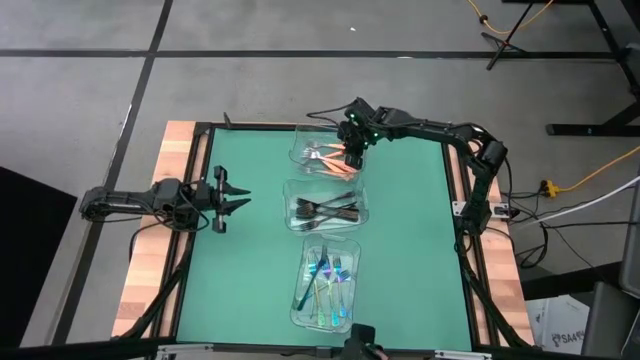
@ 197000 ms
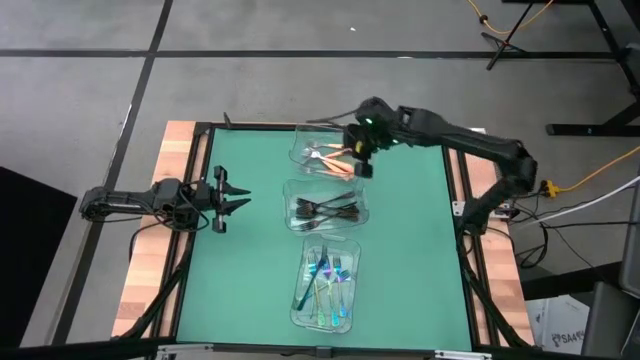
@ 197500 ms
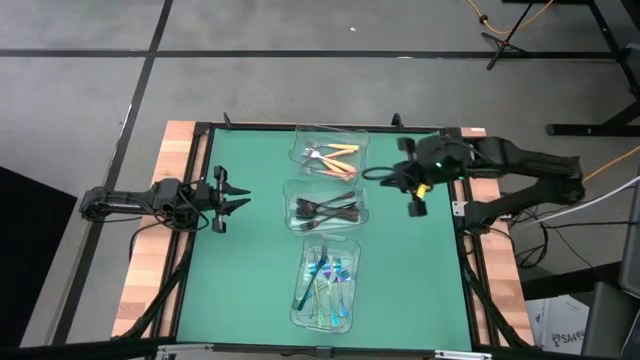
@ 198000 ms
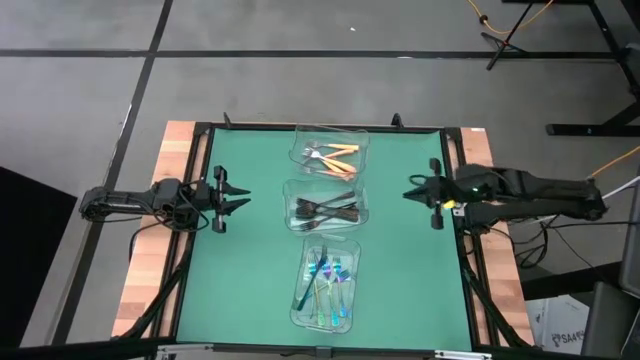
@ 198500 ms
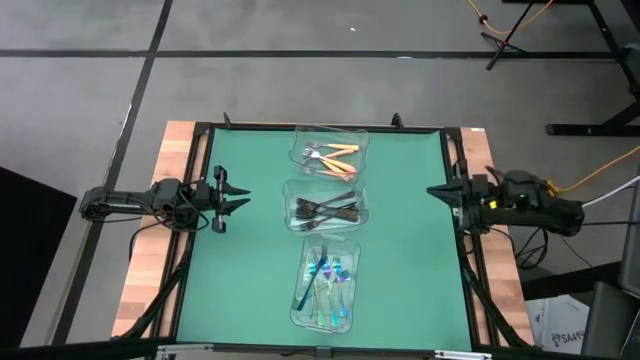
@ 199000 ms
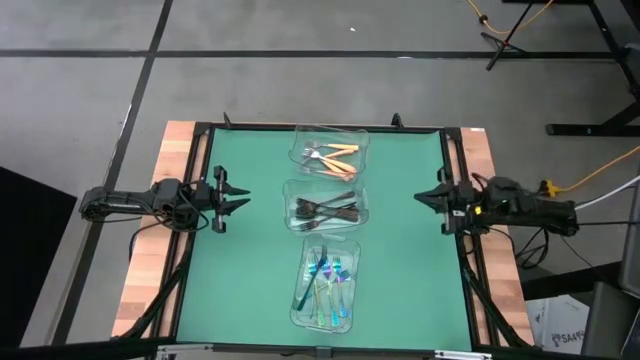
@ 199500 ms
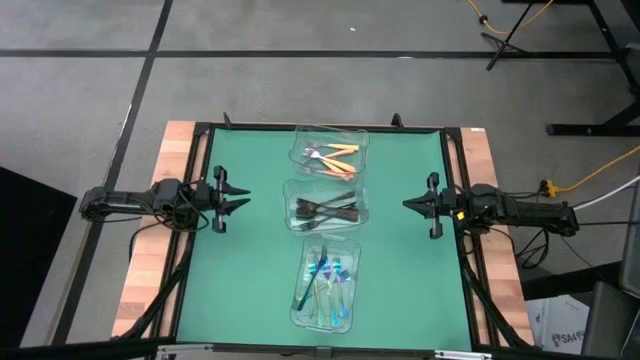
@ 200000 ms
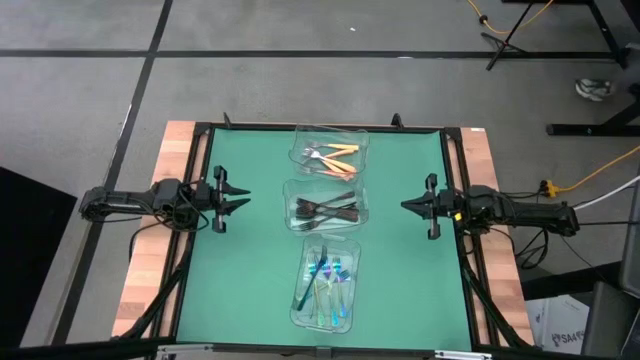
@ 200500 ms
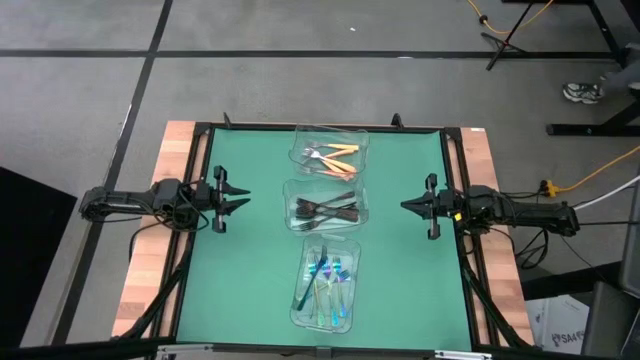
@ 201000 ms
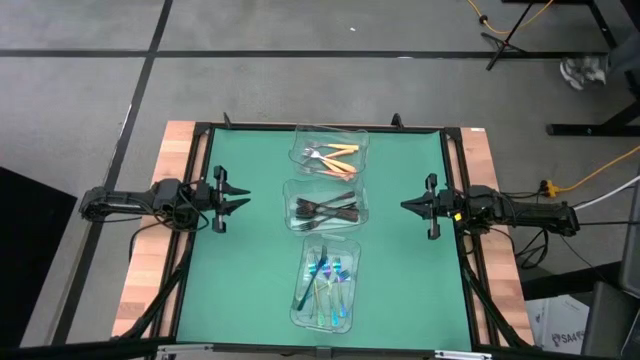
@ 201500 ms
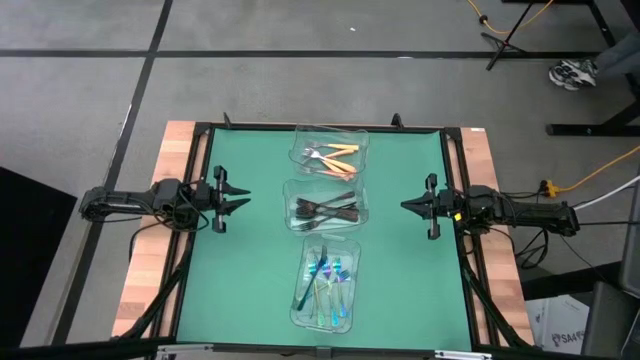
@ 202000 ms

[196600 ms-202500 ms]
Task: Sort silverware by color (type)
Return to Home Position

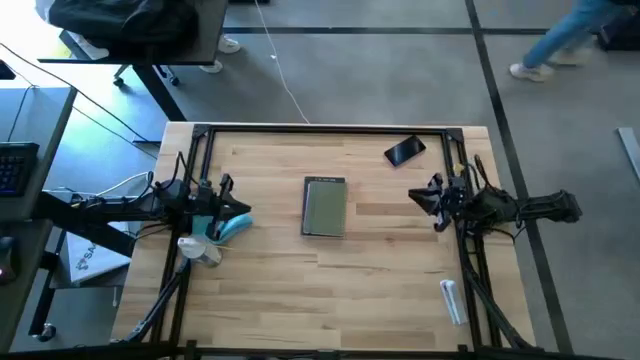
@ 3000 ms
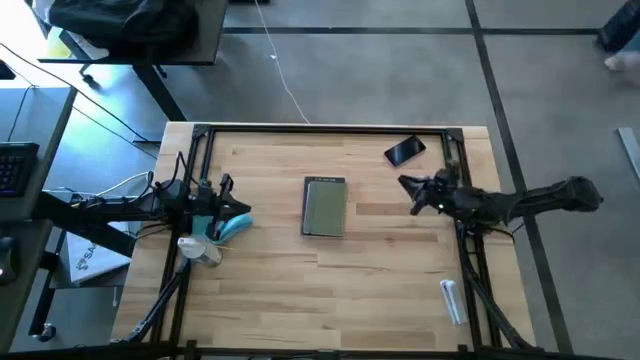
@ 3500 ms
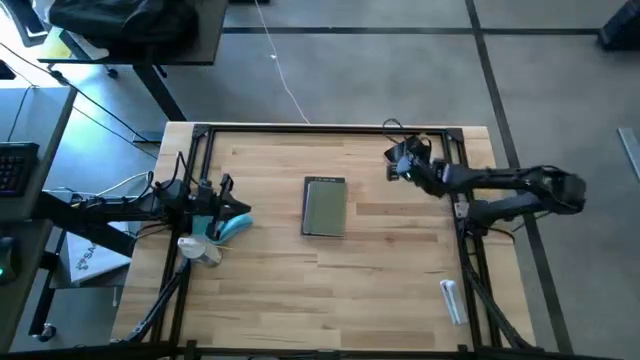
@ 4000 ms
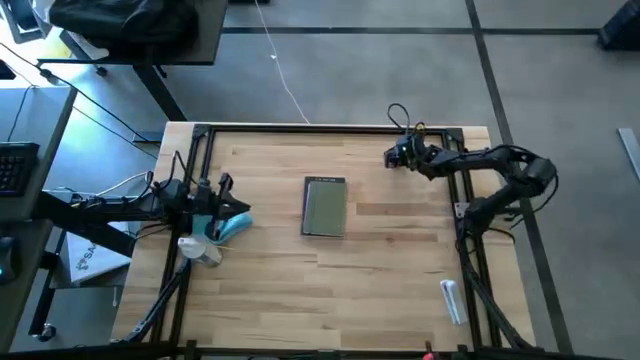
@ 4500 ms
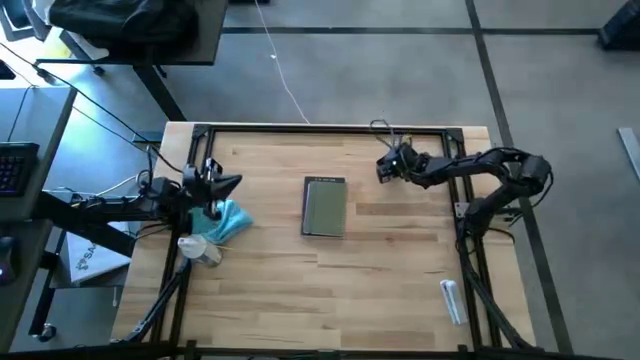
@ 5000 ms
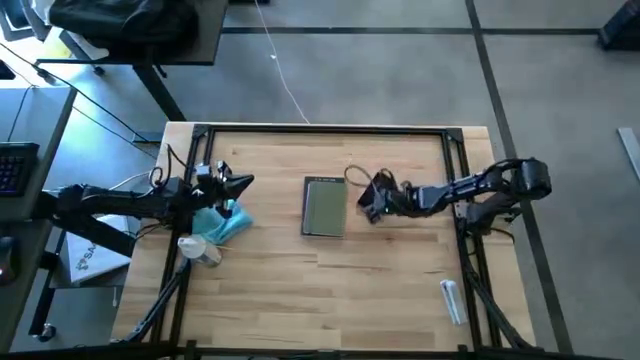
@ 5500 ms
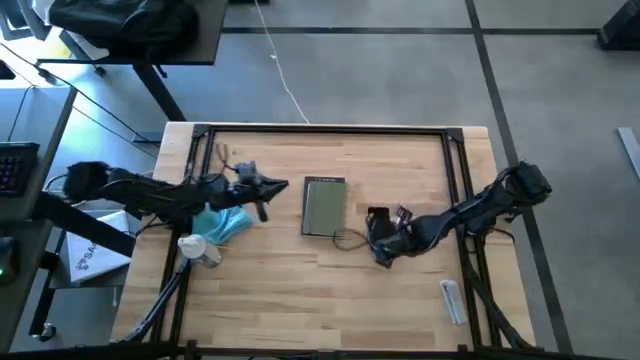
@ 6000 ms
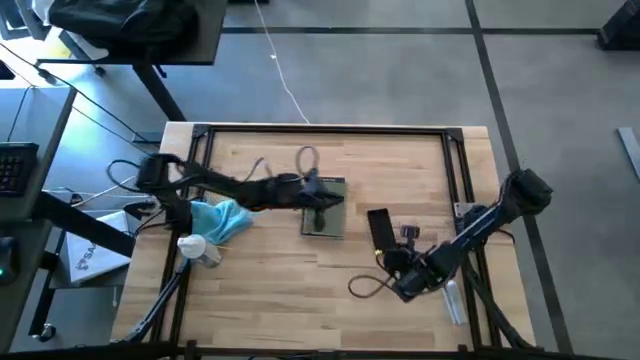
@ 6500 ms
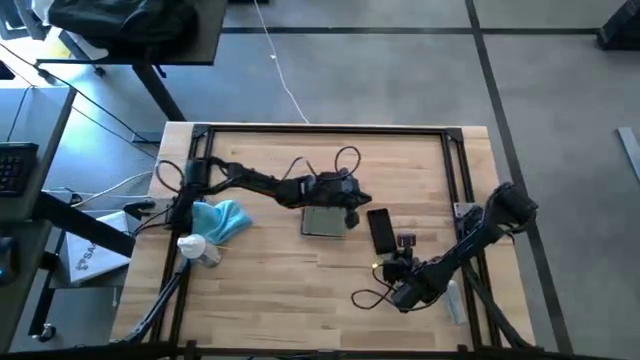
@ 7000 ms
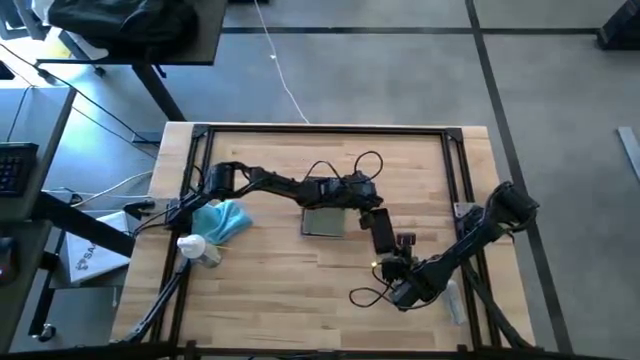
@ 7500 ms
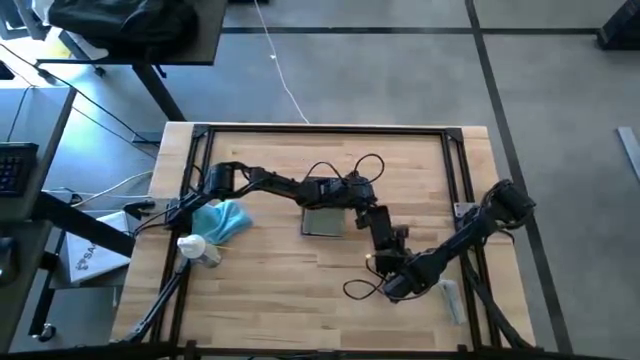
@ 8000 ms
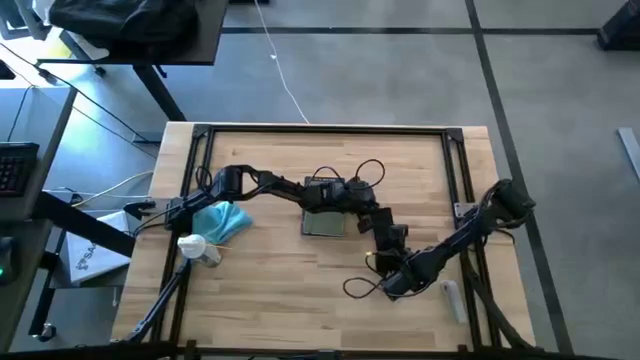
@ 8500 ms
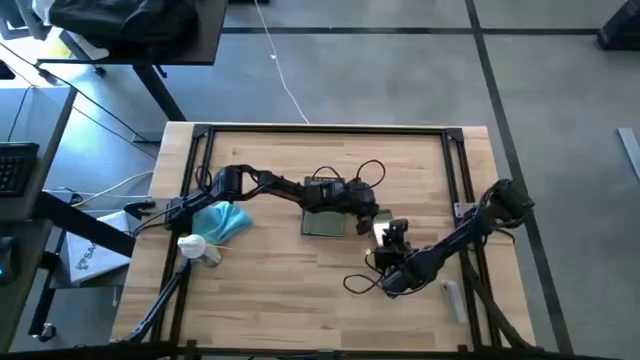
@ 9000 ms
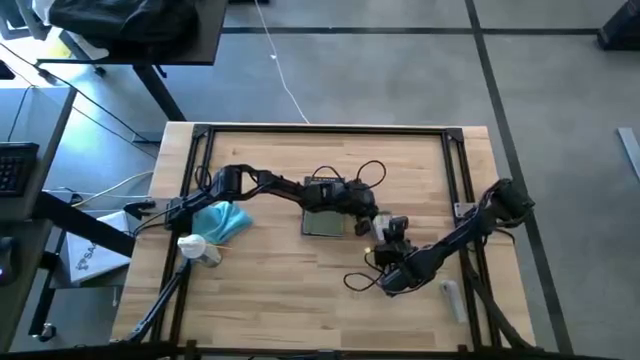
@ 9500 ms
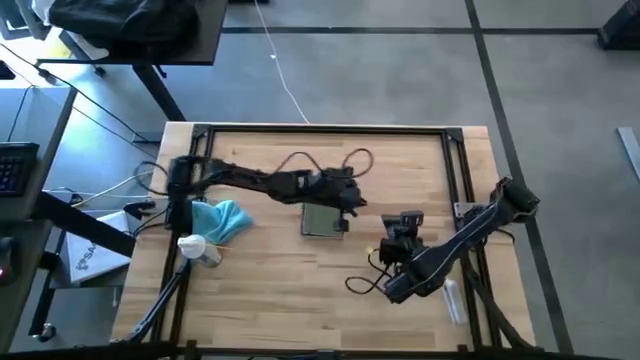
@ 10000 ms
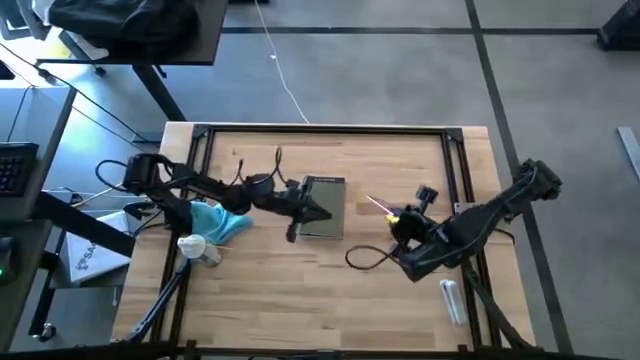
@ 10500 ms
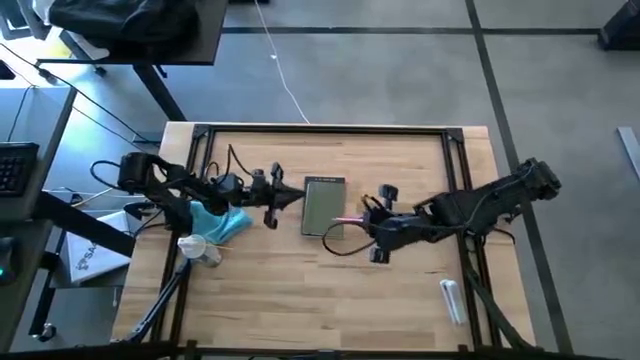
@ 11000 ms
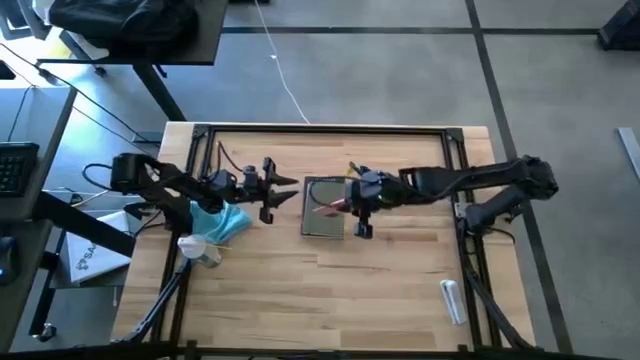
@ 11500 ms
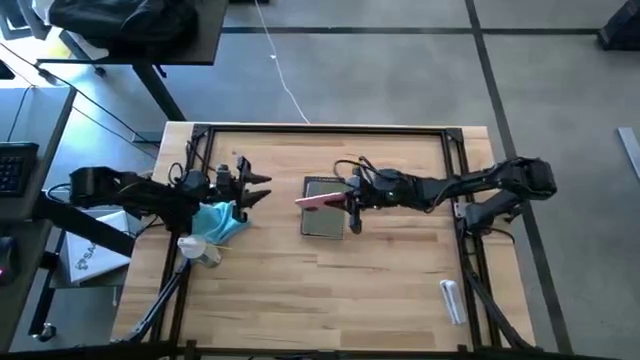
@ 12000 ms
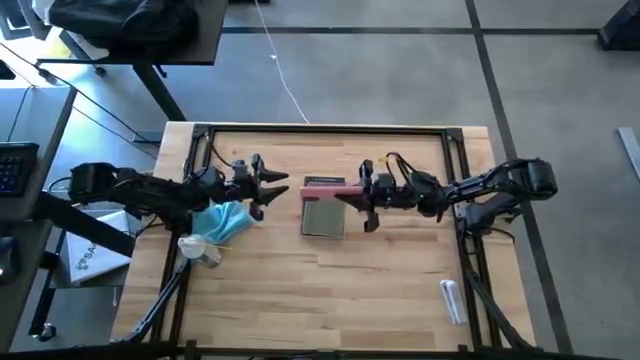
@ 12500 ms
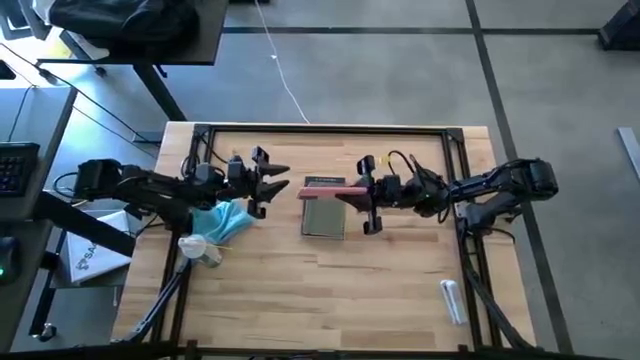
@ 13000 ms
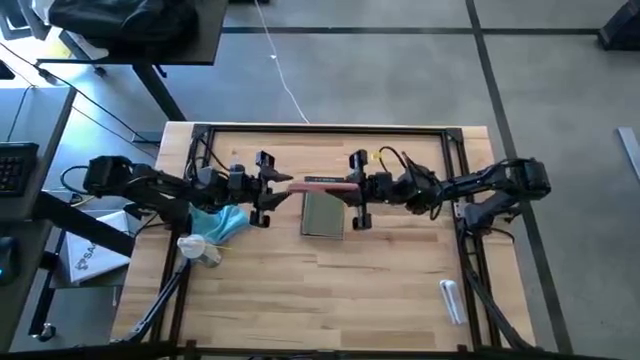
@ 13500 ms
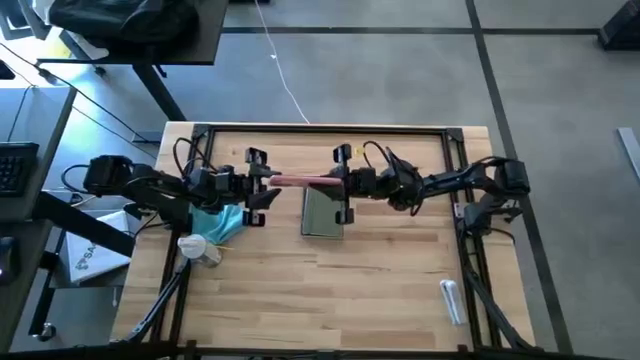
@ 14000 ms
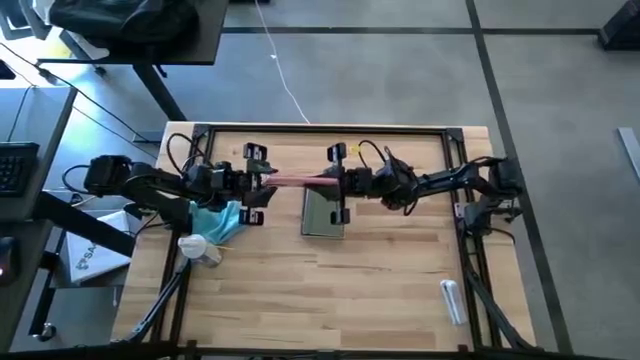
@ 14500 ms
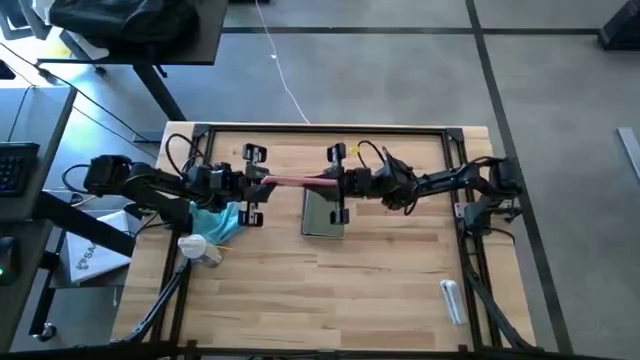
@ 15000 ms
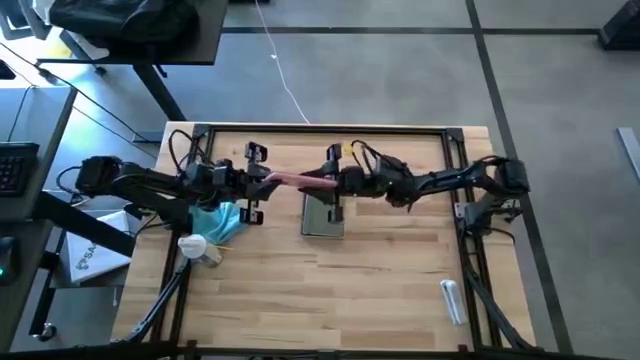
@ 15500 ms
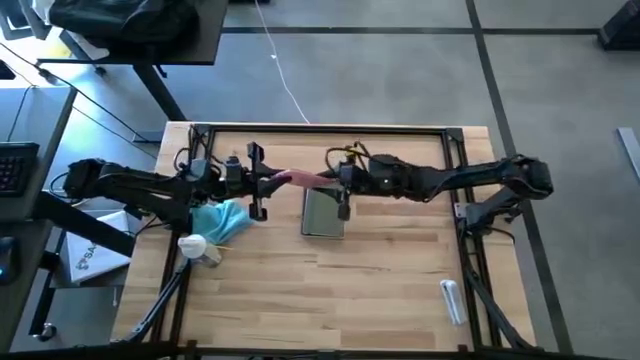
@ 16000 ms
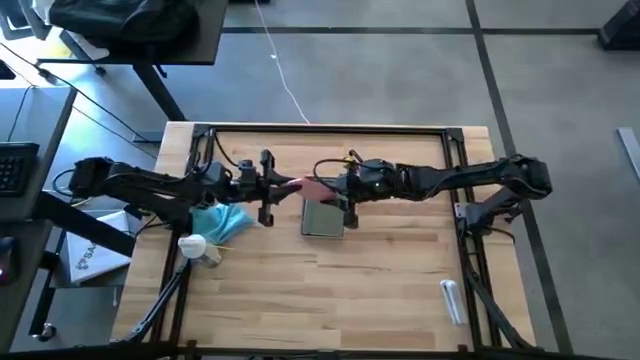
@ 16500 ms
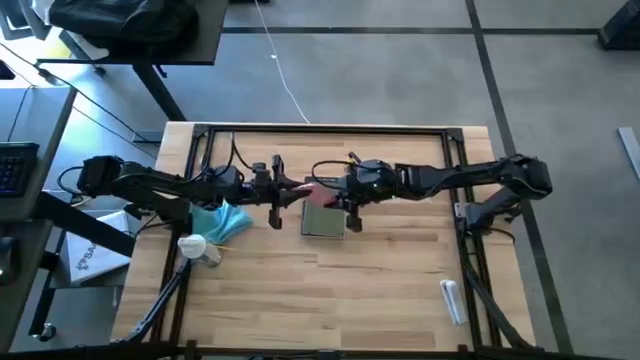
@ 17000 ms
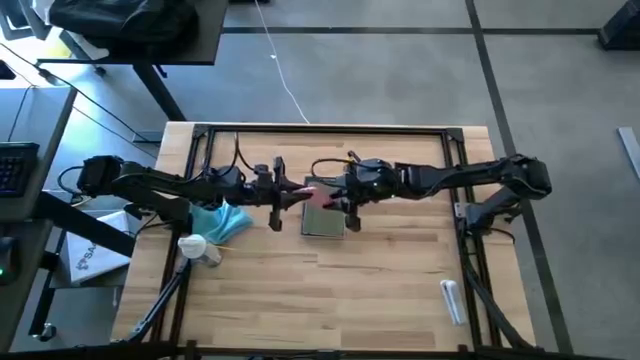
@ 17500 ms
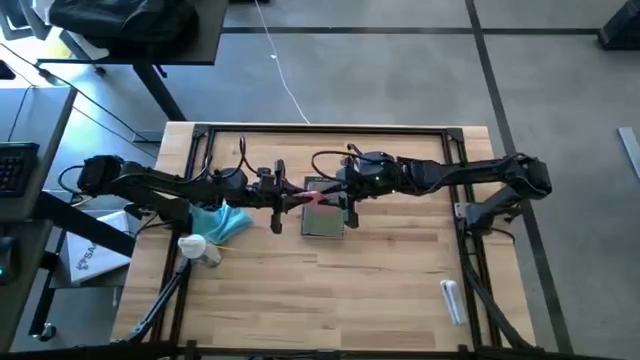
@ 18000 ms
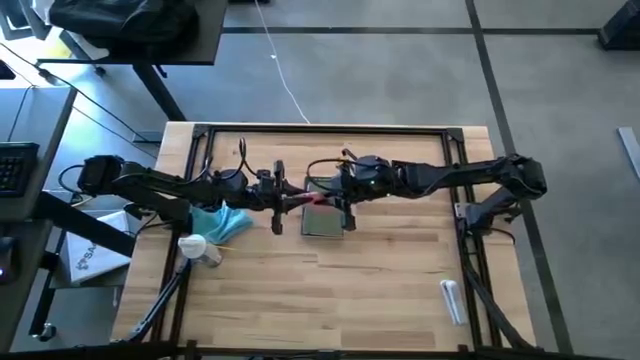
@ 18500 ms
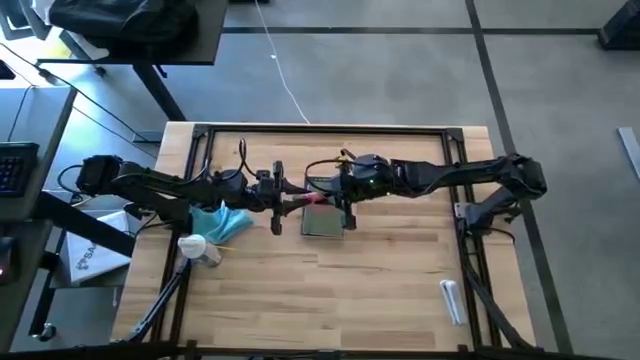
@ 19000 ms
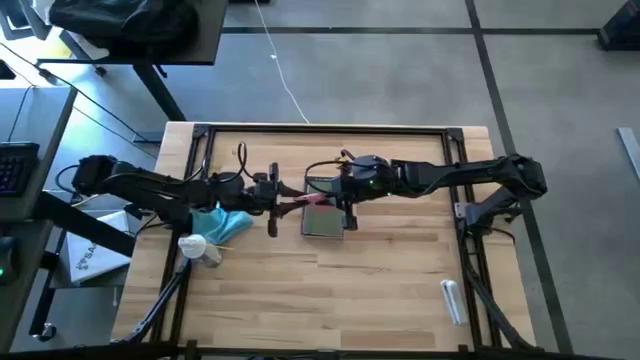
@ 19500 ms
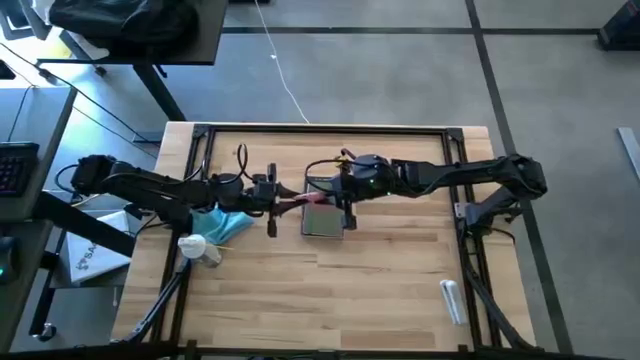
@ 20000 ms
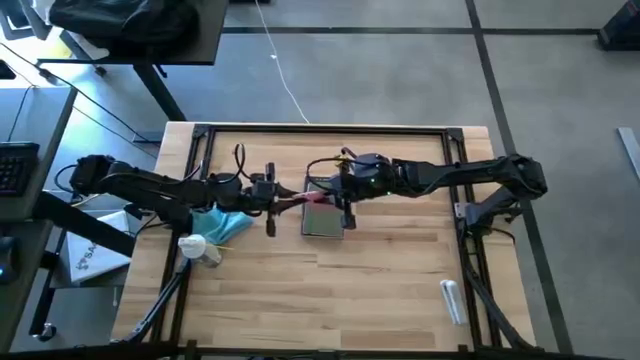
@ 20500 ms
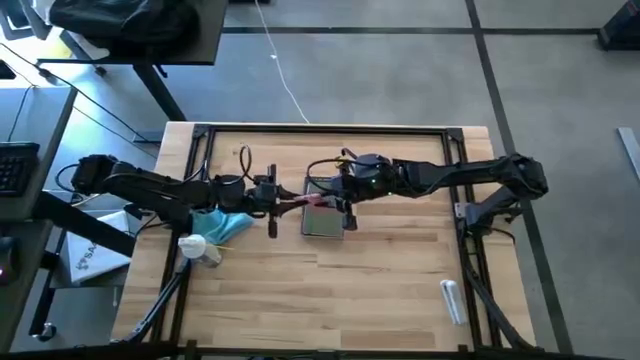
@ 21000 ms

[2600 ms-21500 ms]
Task: Apply microfiber cloth
Spray the cellphone using the spray bottle
